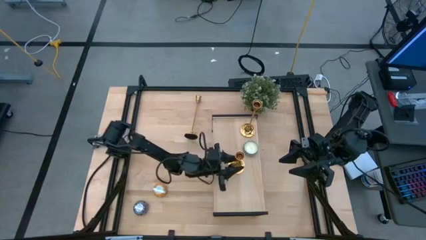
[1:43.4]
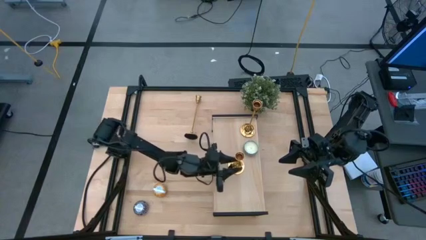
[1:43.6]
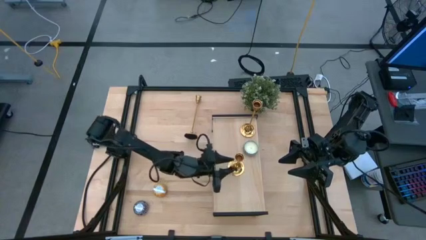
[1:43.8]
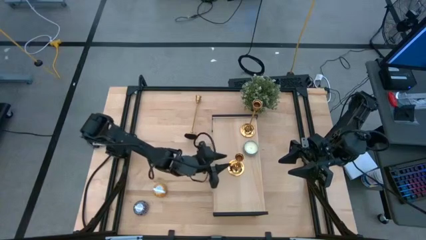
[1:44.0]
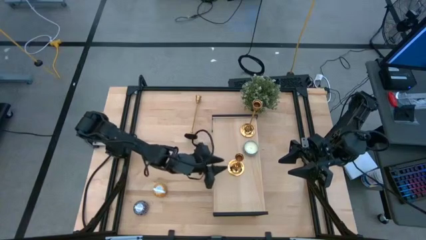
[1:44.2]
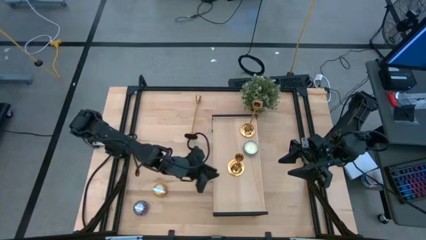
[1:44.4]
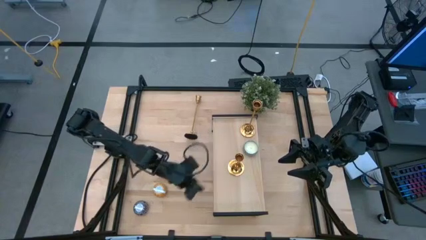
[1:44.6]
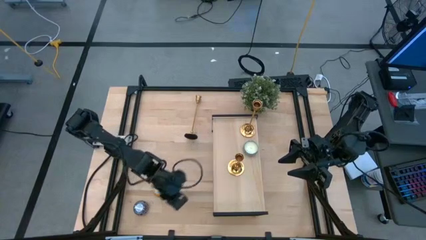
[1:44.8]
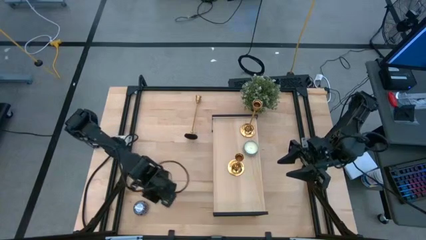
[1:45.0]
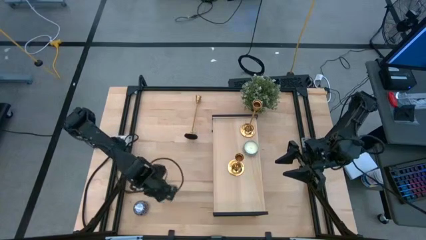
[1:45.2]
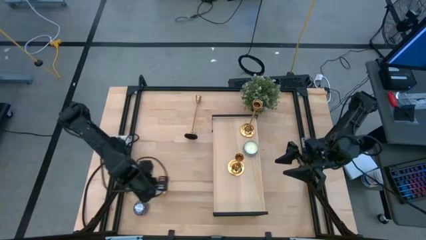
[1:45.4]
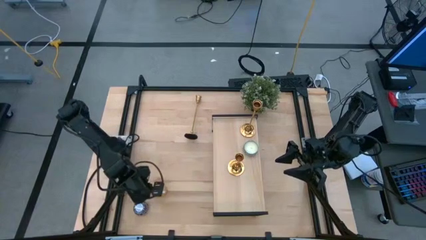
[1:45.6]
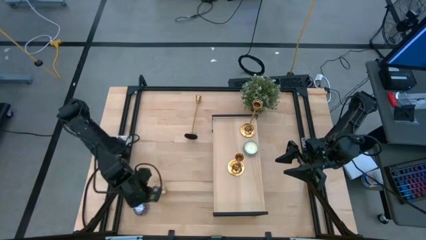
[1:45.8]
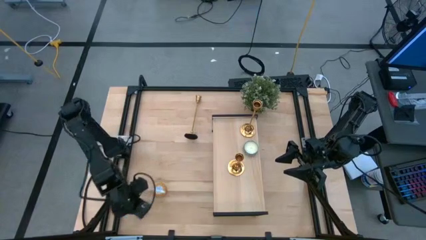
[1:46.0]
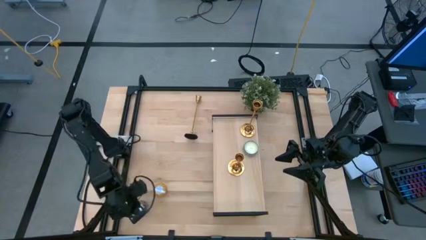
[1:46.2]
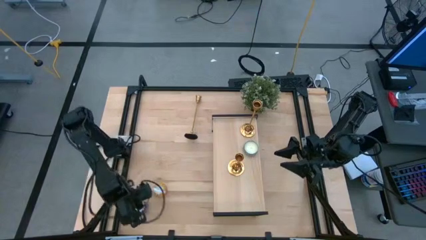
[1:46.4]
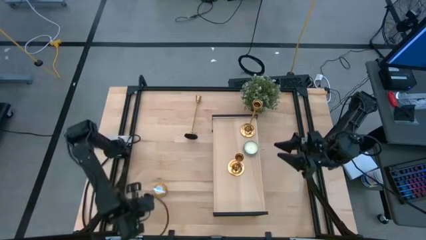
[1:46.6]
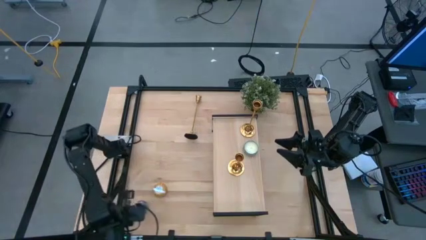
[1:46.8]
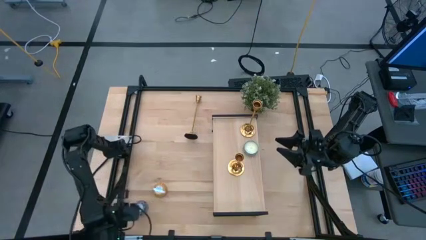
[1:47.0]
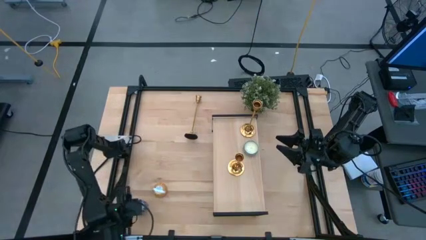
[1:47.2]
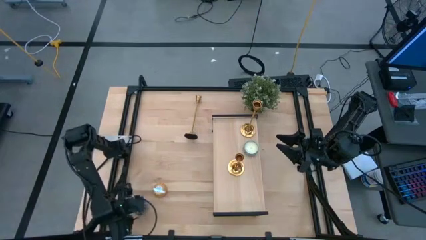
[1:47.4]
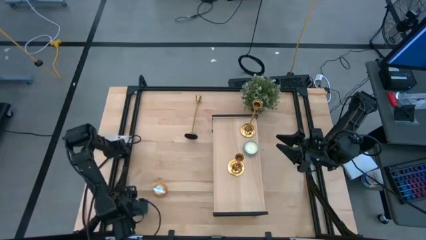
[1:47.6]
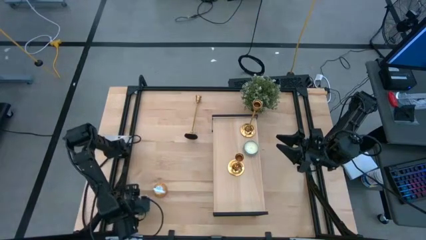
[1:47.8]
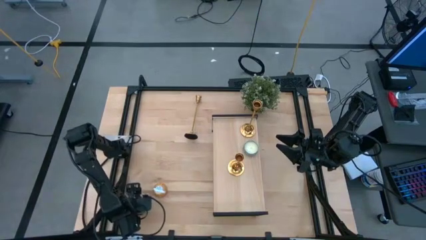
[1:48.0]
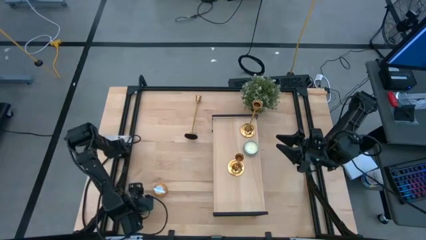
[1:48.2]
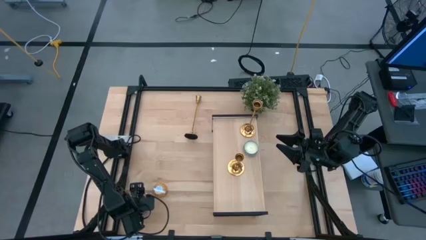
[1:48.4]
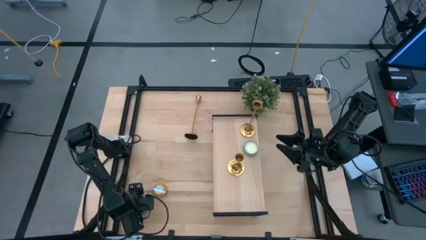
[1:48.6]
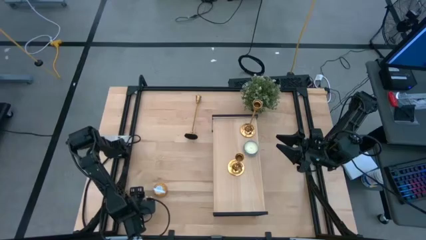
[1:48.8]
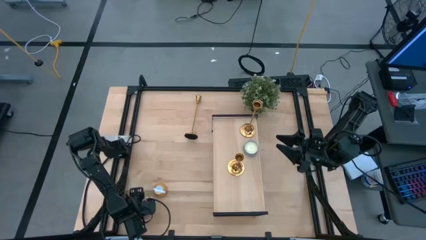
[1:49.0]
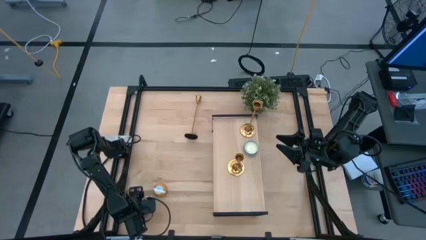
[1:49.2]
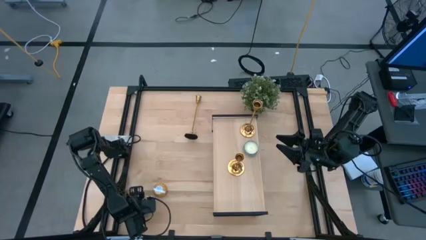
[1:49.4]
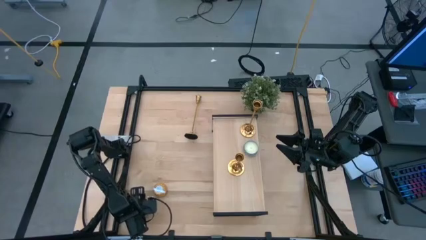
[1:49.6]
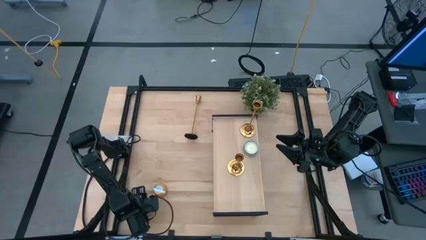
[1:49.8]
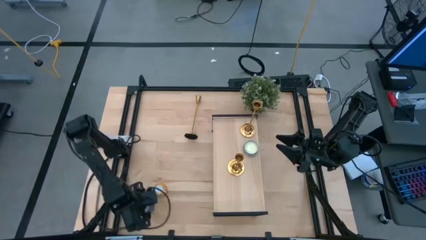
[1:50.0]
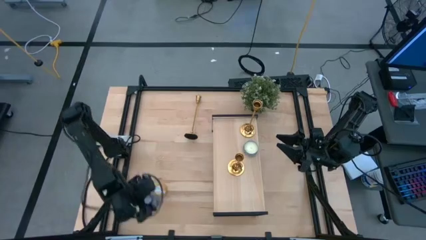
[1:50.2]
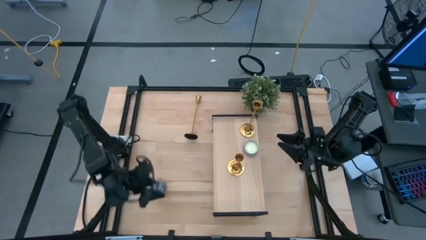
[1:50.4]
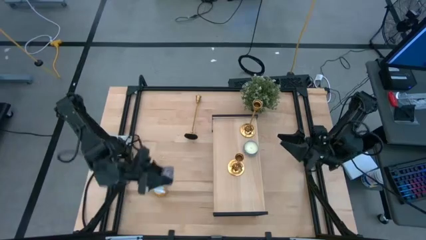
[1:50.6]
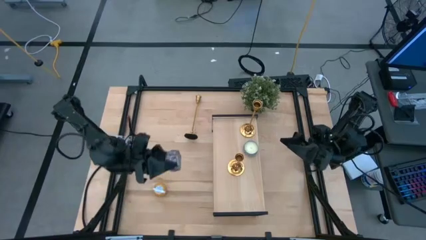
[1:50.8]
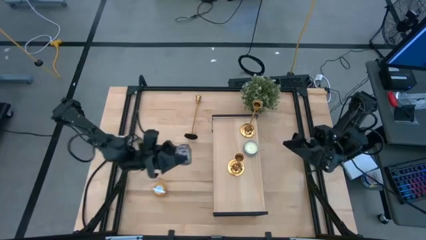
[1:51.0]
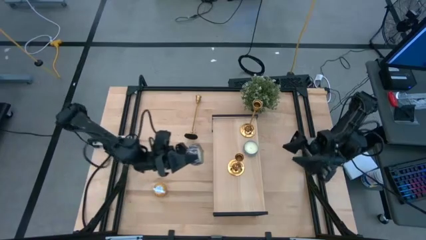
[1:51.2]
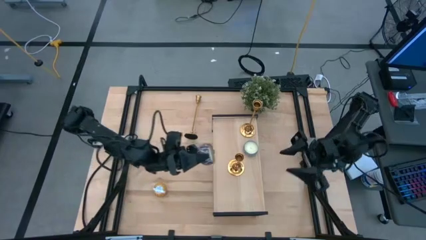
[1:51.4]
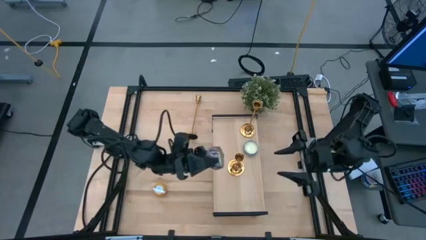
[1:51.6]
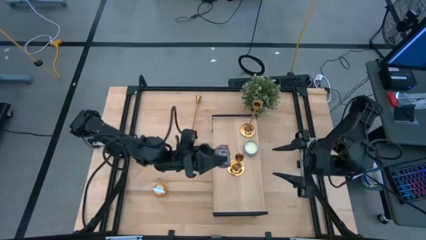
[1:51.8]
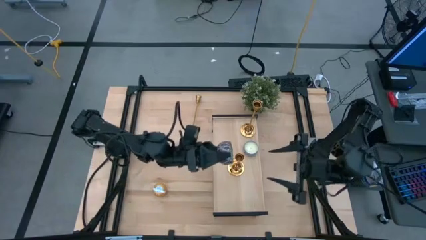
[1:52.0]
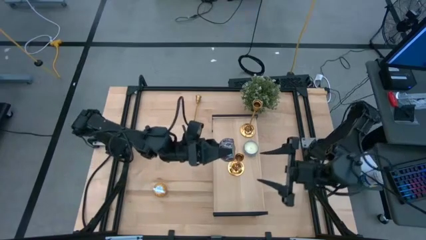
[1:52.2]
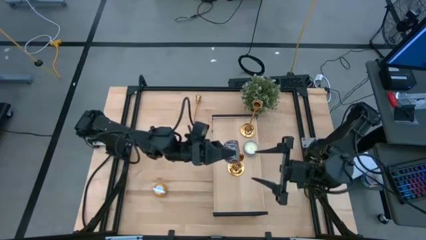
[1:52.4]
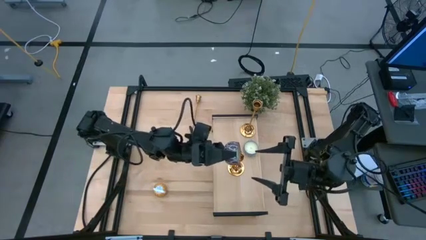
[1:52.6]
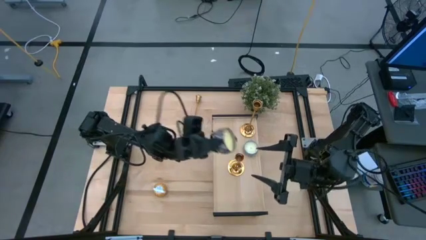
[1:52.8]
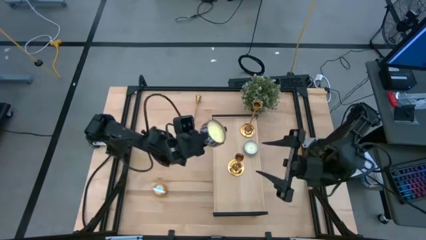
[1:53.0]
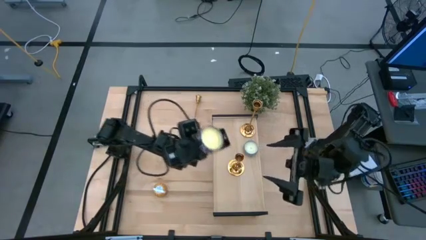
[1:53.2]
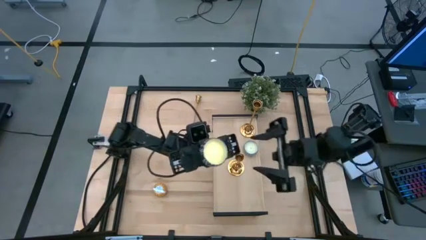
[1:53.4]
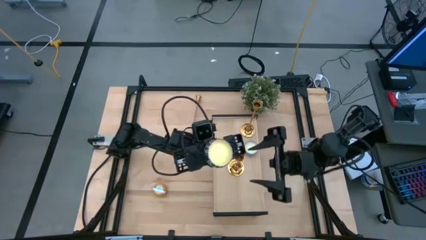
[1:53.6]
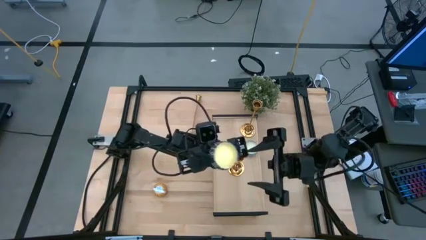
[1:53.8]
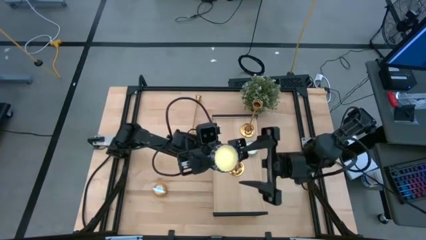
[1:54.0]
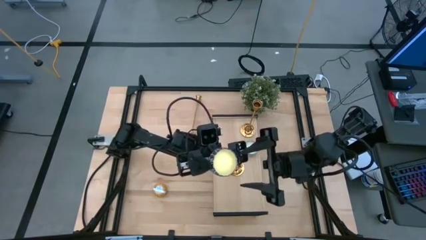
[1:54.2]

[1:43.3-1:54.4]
Task: Pick & Place candle stick holders
Put the red patterned scented candle on the shelf

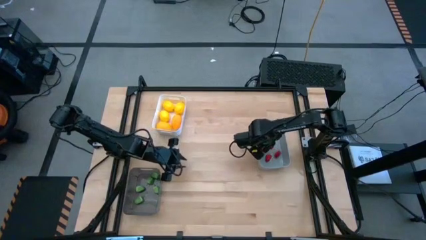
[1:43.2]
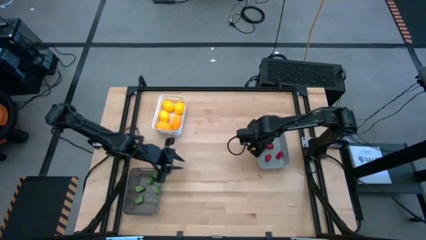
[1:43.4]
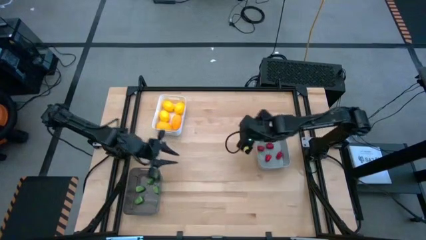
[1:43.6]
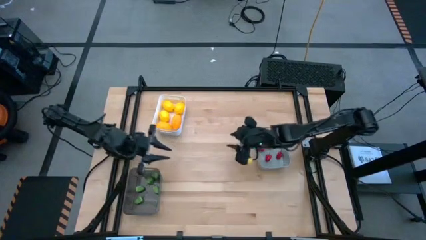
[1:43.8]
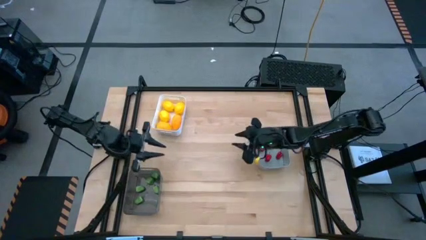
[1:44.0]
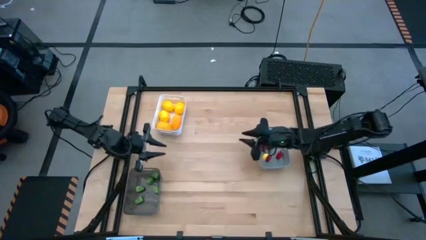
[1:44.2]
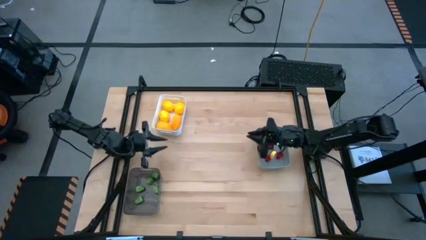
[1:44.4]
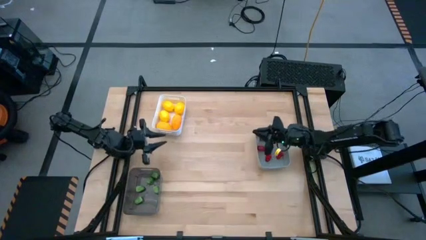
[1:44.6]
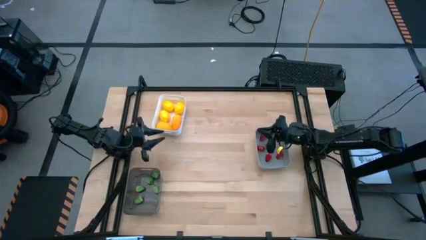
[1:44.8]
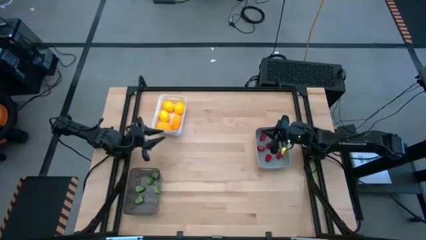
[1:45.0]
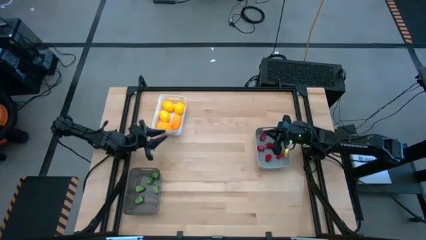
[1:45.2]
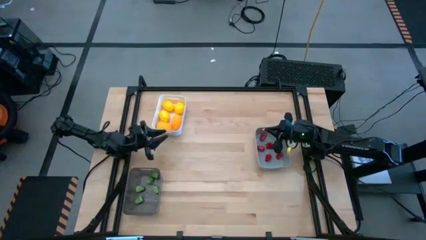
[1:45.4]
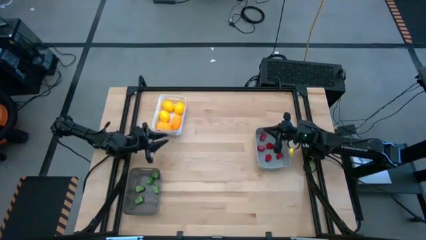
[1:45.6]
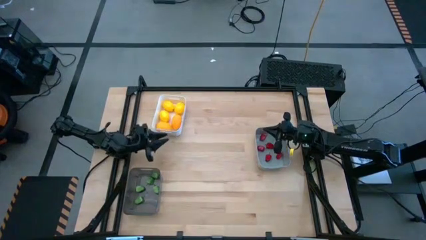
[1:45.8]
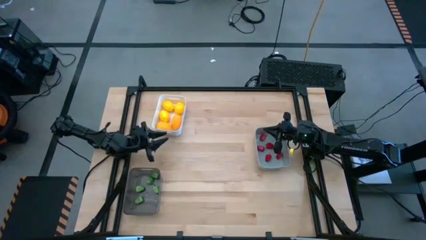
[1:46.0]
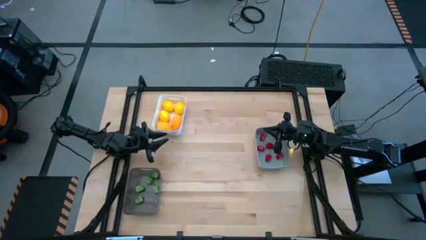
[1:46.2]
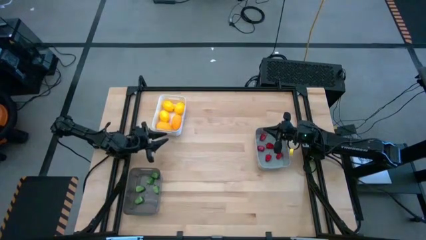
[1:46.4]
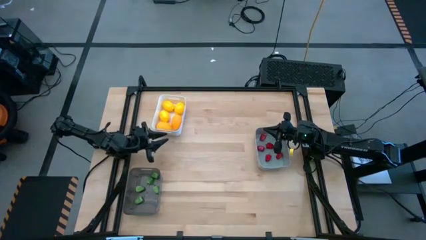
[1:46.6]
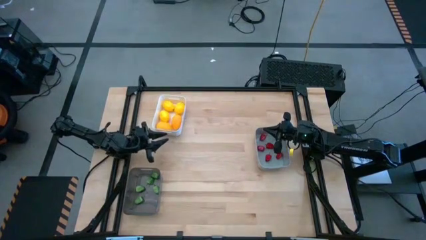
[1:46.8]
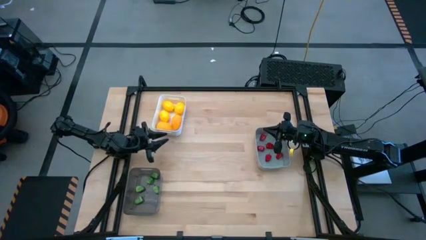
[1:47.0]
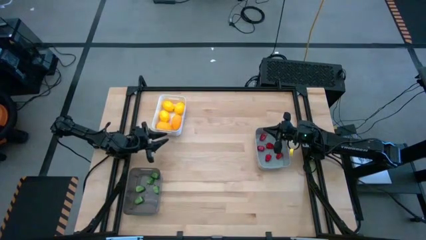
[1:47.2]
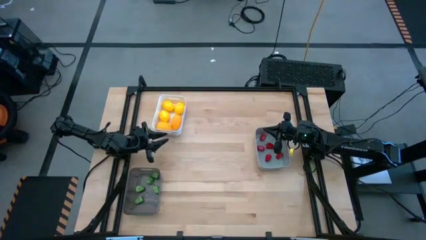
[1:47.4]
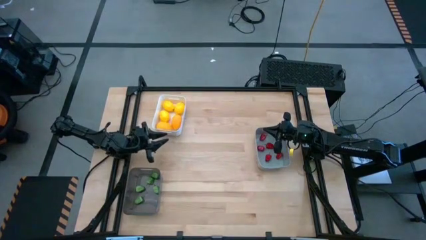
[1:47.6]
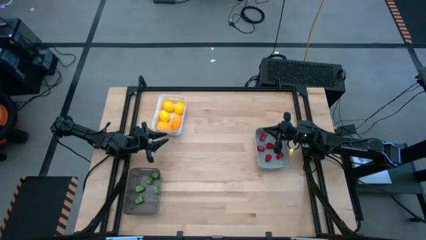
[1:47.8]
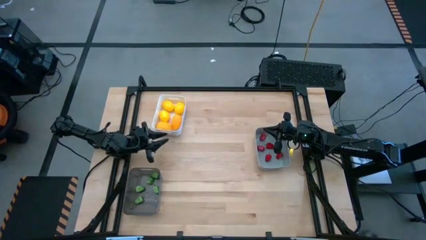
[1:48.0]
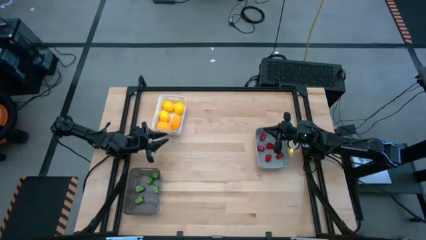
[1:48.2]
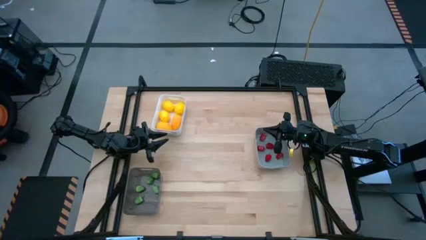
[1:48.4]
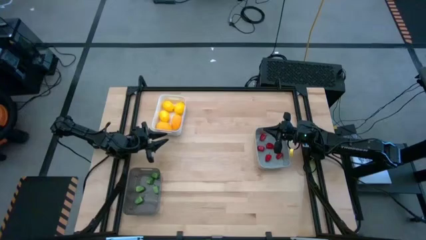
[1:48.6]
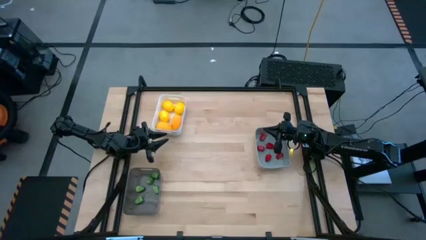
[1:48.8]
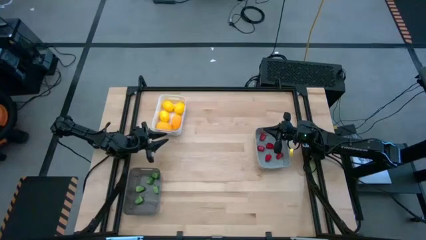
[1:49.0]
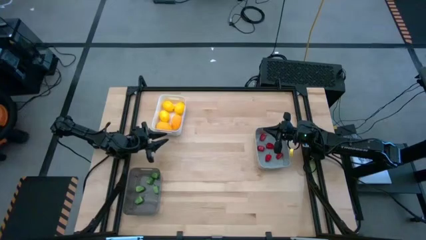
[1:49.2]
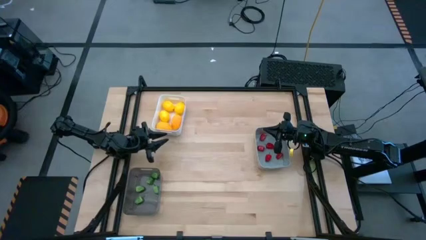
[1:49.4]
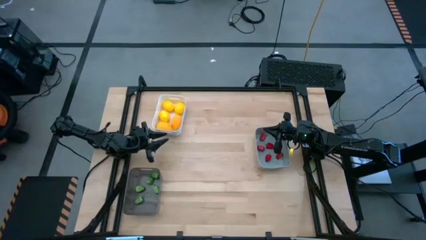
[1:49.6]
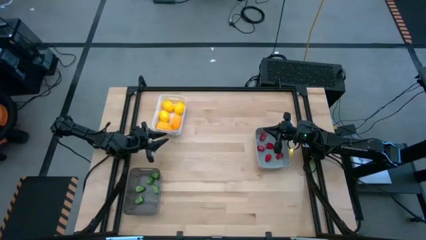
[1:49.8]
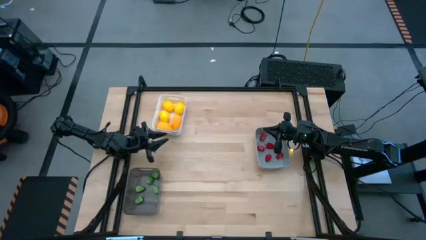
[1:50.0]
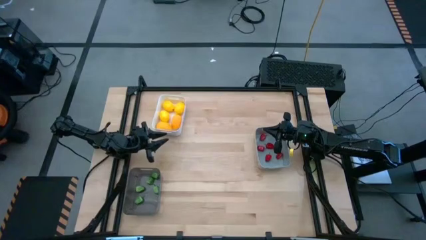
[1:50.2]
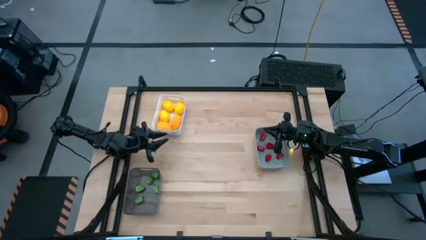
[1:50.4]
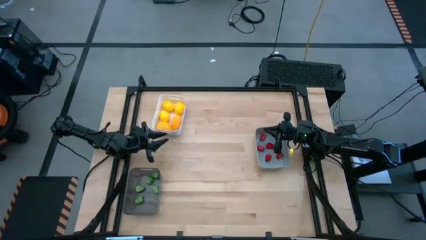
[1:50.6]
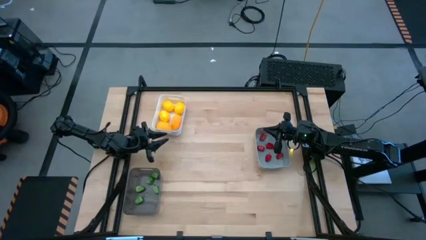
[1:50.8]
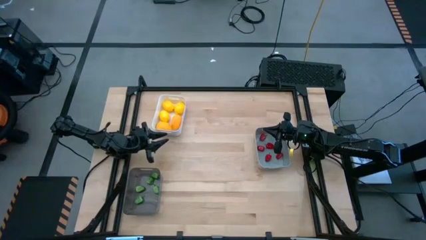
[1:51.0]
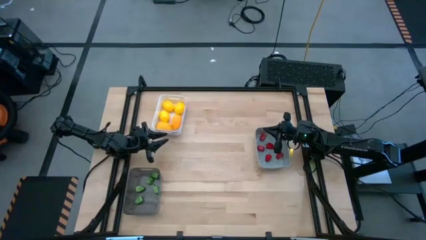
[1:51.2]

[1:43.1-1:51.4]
Task: Sort produce into baskets
Return to Home Position
